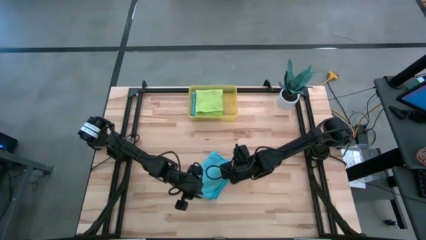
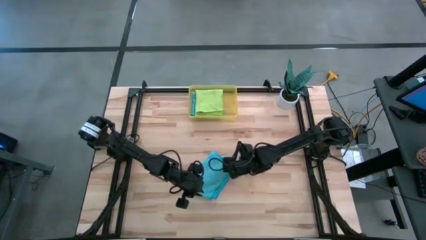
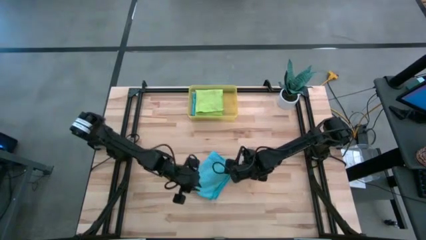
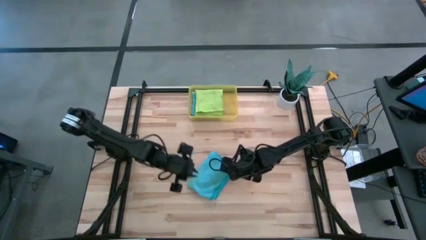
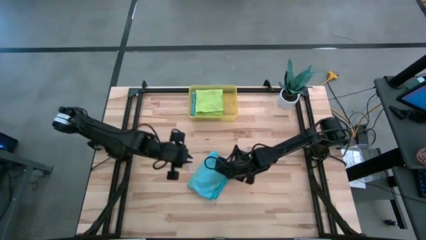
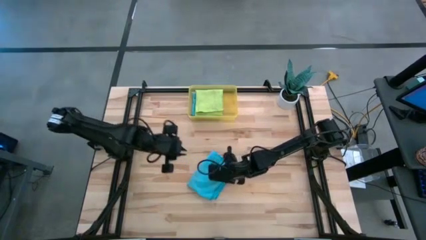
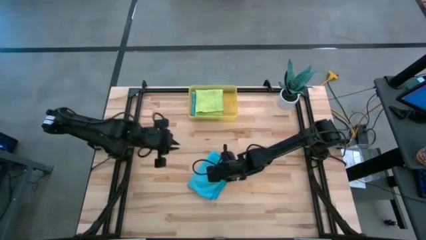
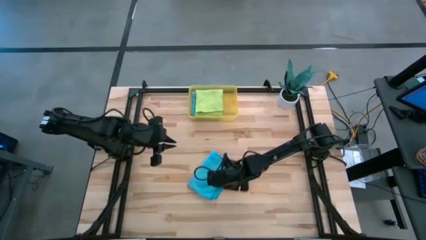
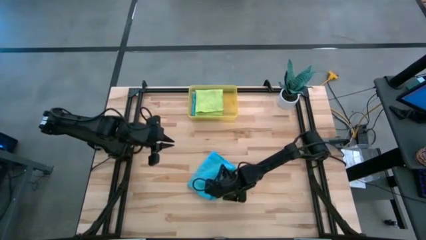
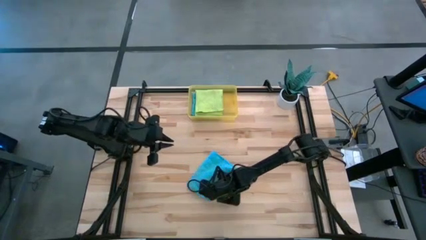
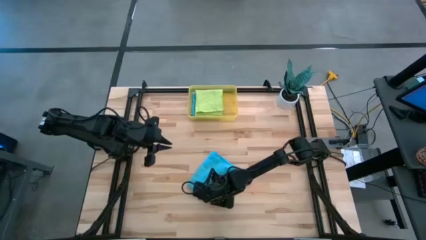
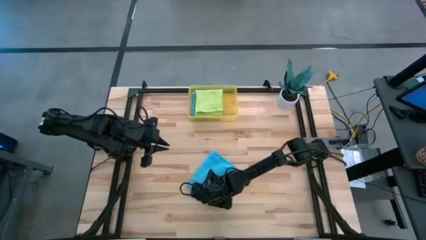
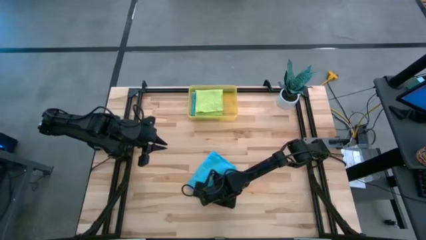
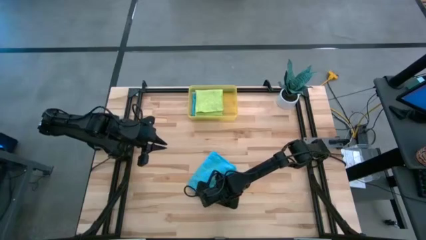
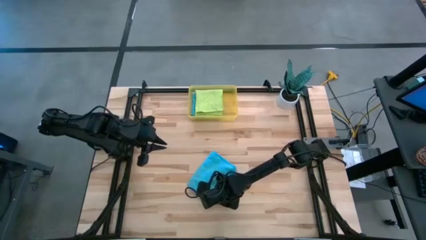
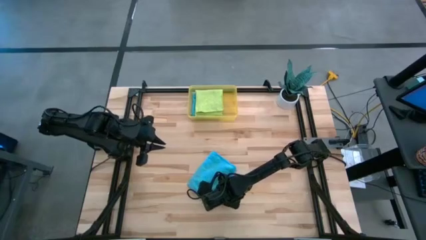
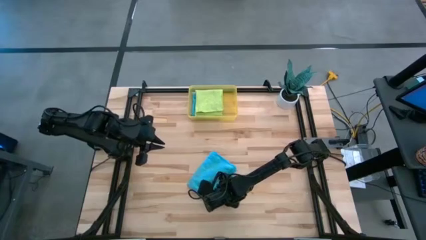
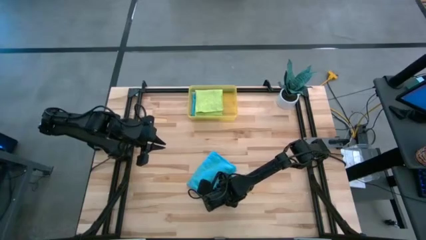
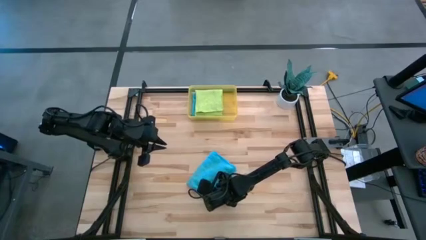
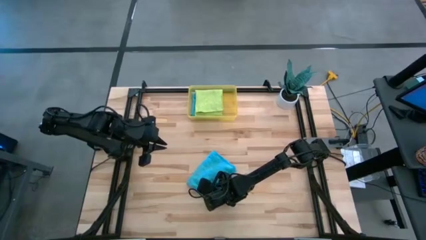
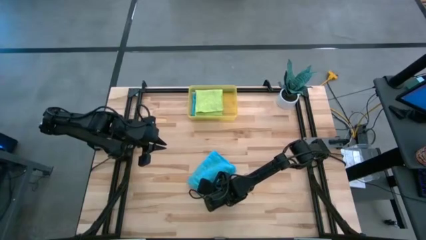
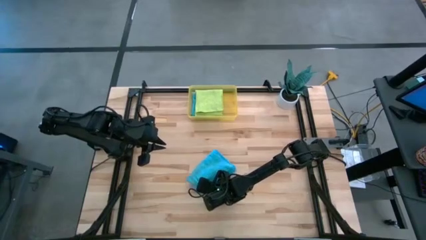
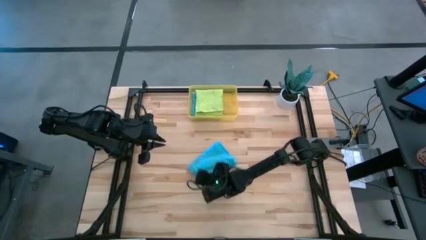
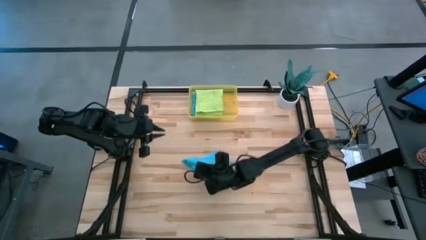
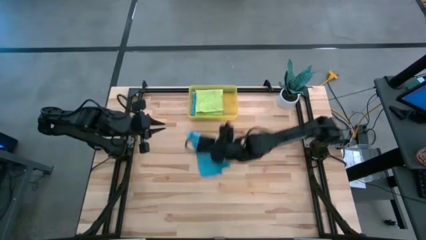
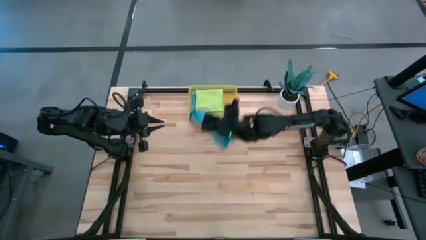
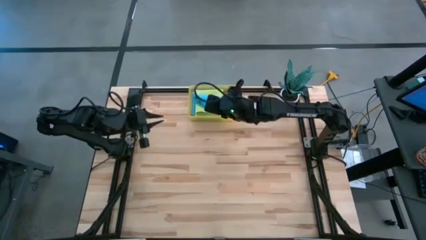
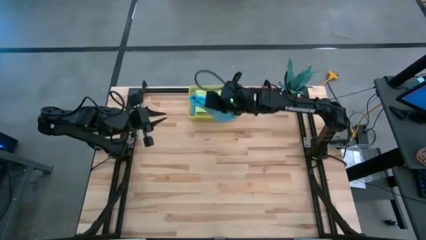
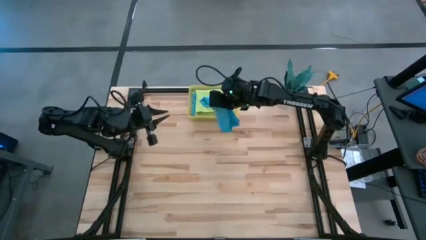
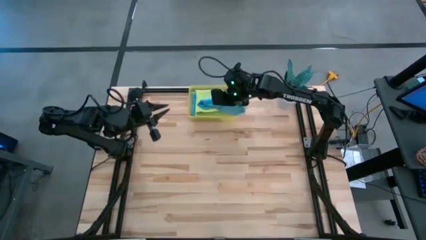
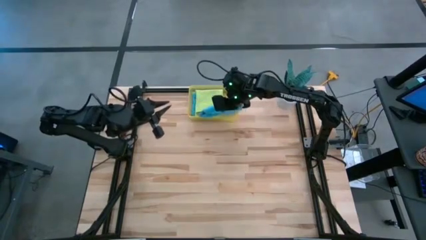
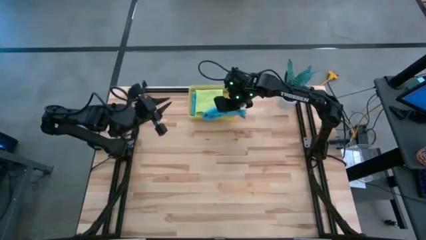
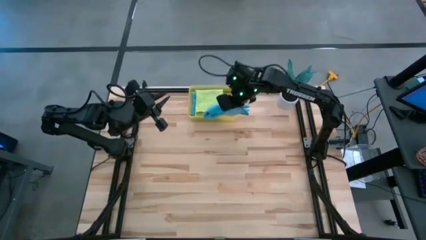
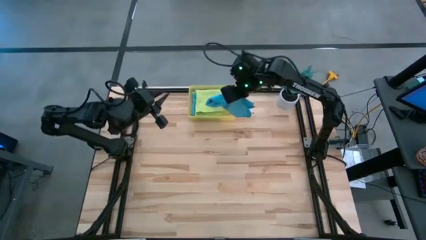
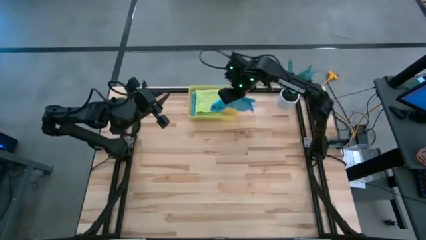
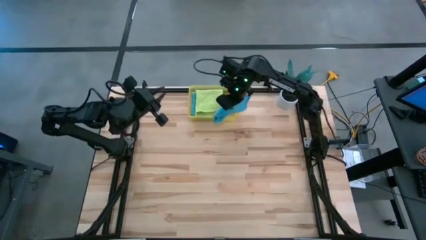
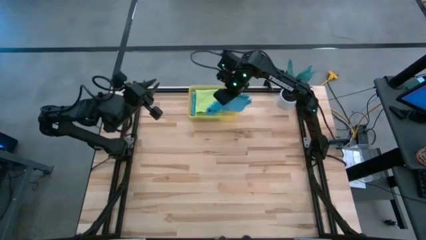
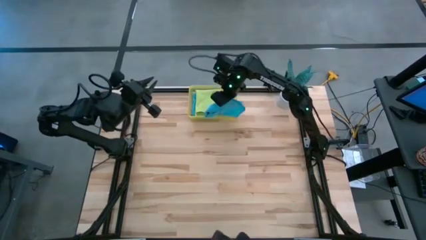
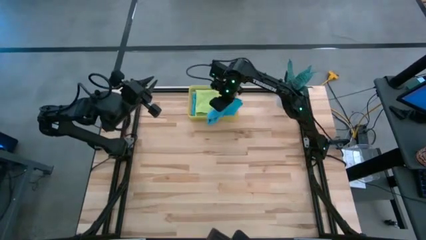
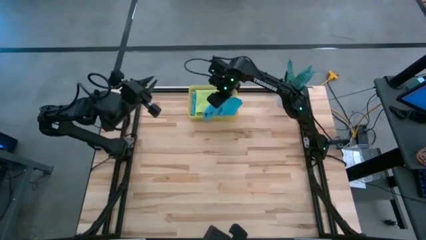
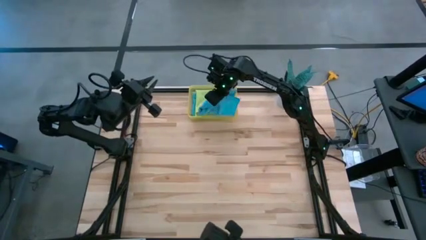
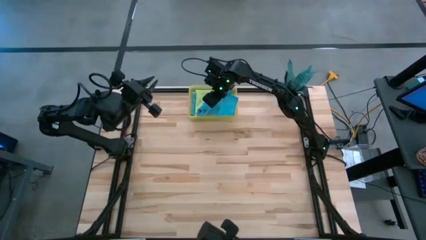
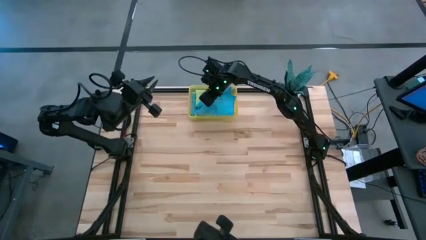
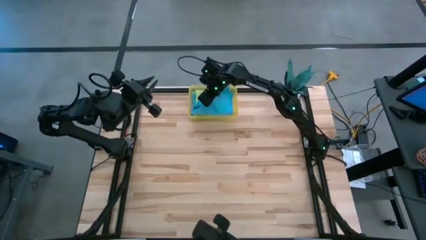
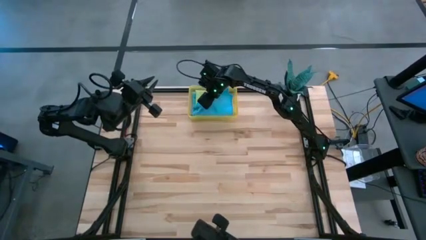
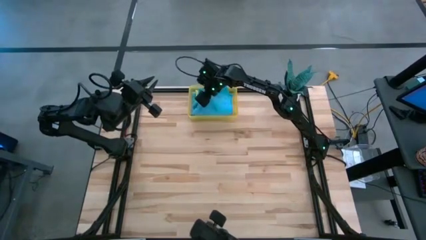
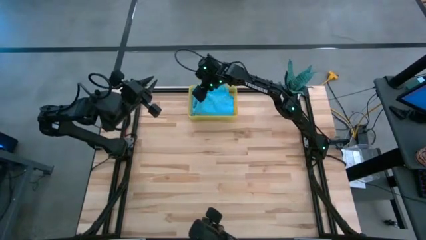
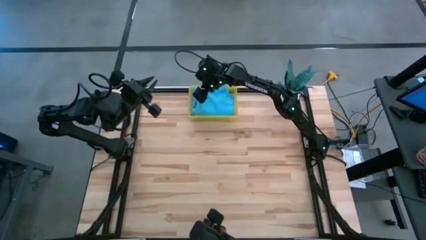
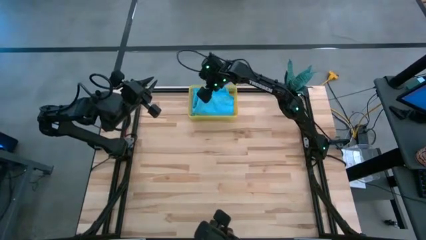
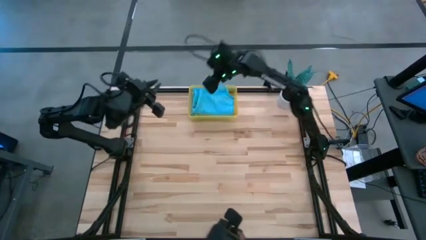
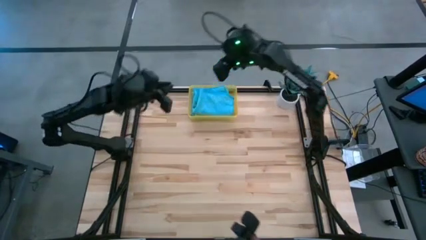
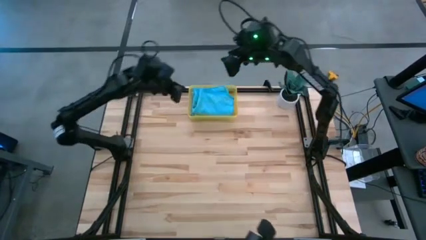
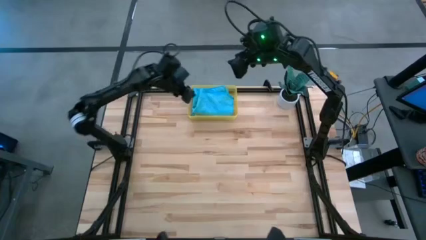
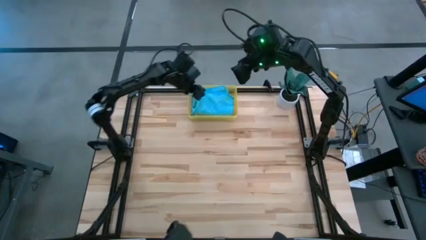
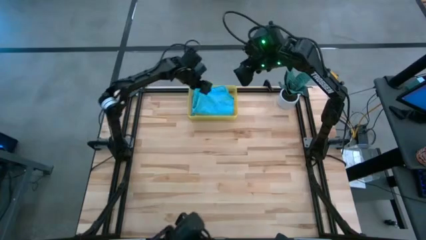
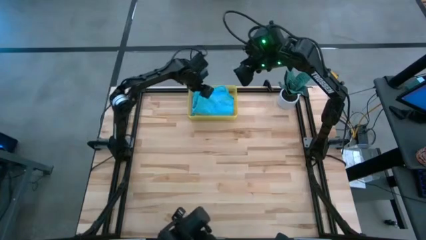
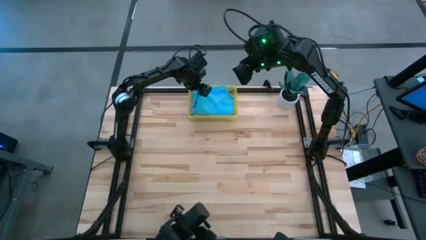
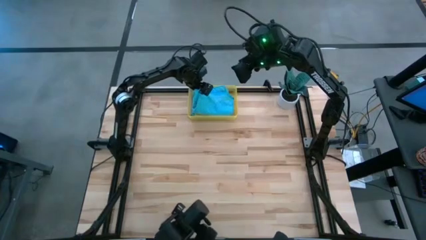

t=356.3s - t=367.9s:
Task: Fold microfiber towels
Stack the blue microfiber cloth on the green microfiber cloth in the yellow bin

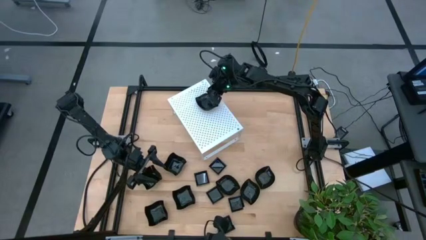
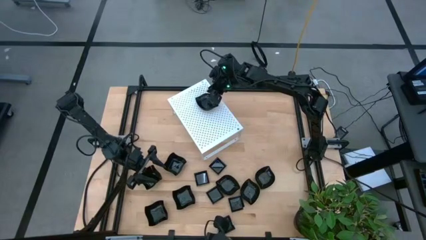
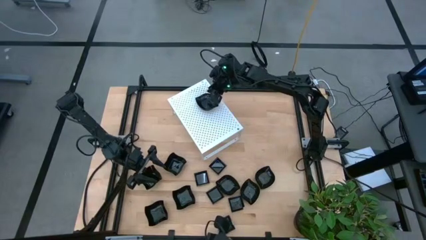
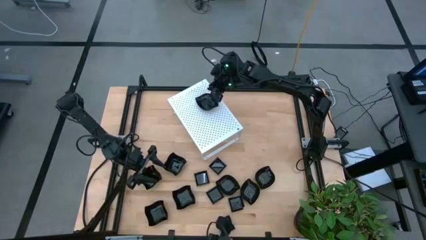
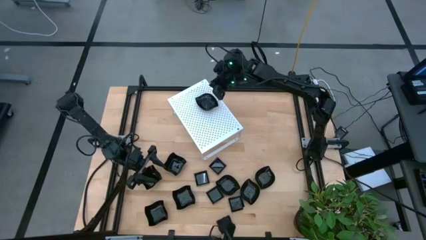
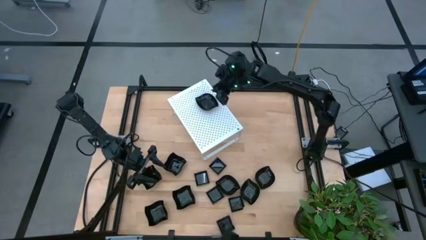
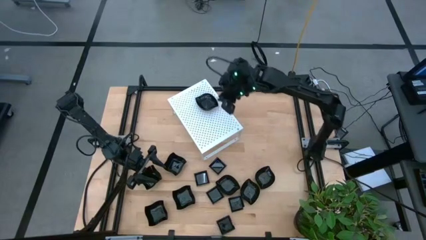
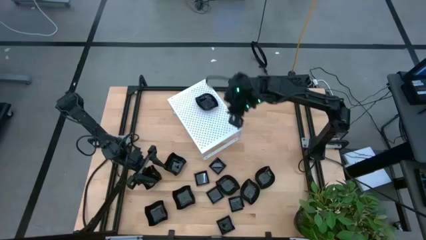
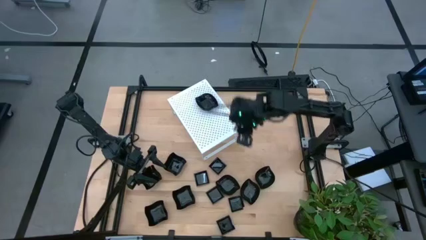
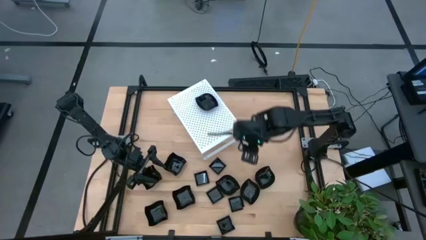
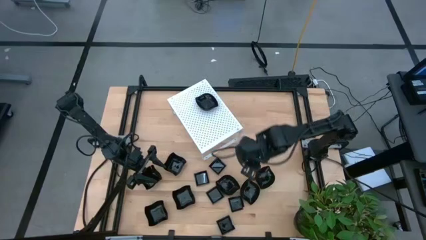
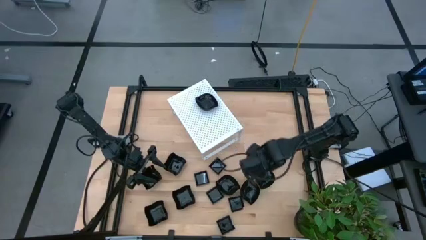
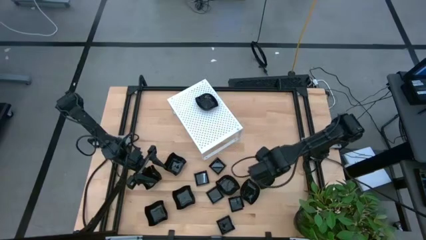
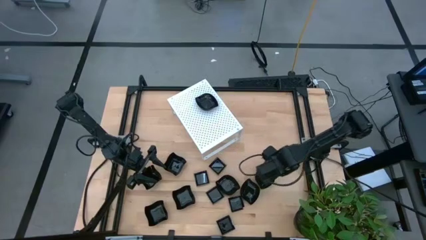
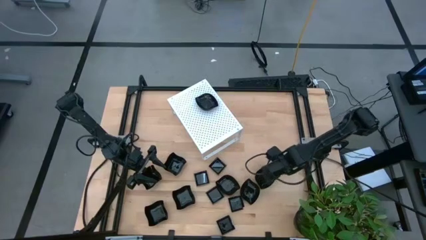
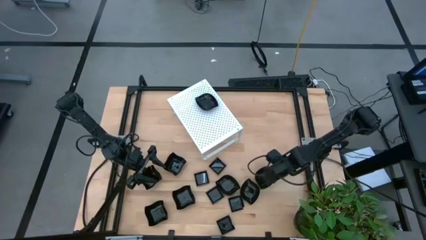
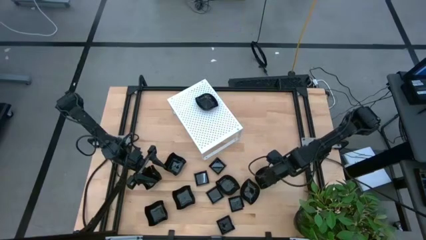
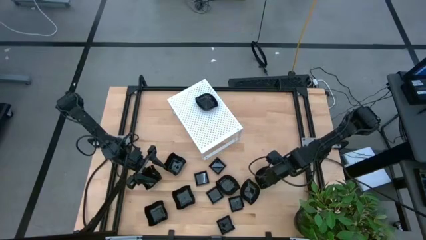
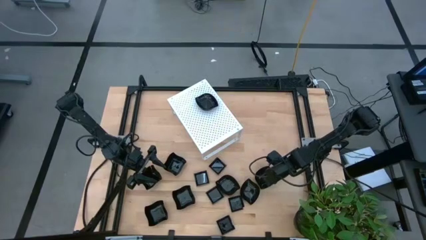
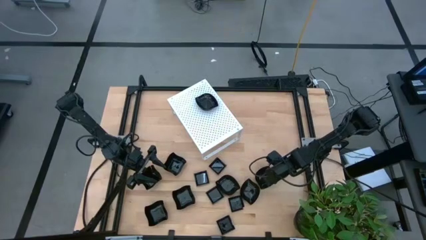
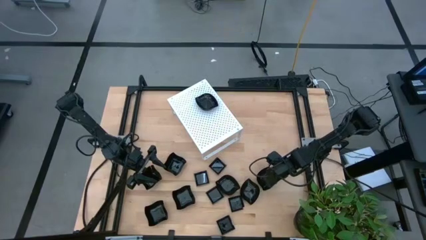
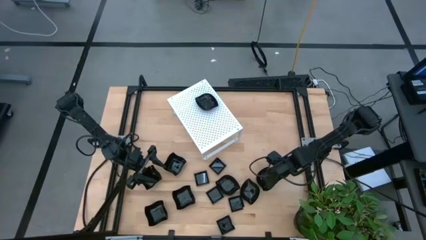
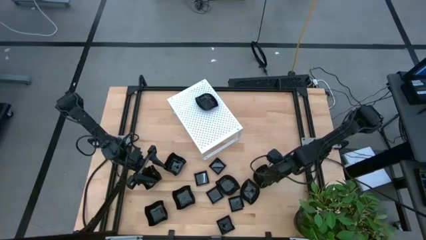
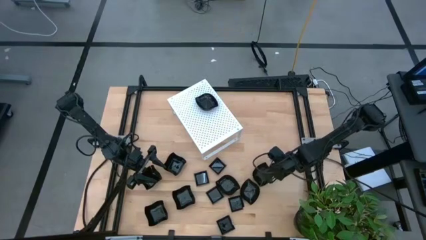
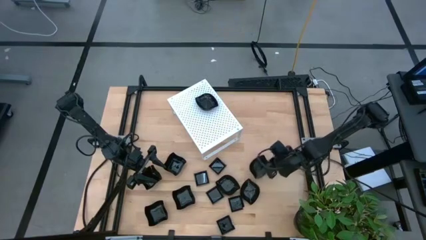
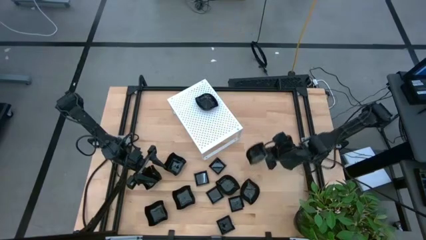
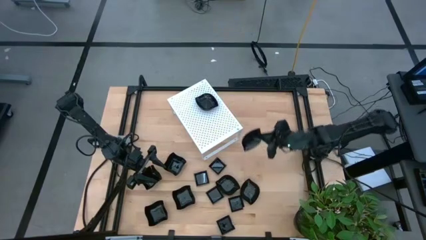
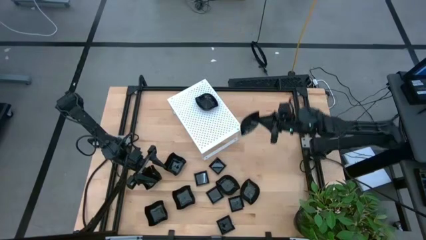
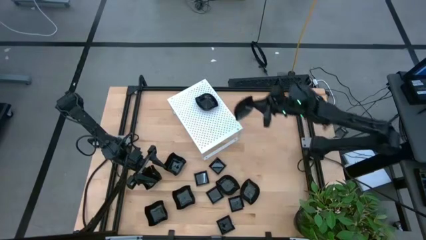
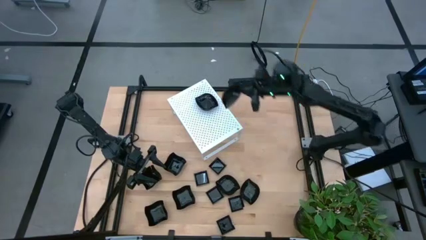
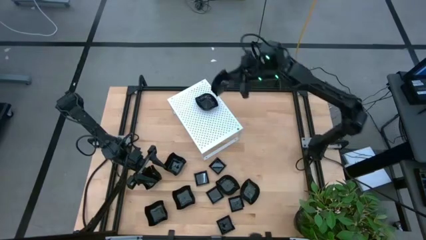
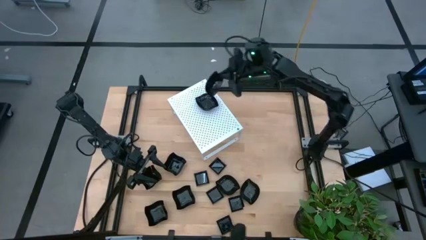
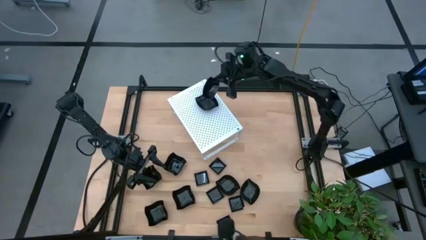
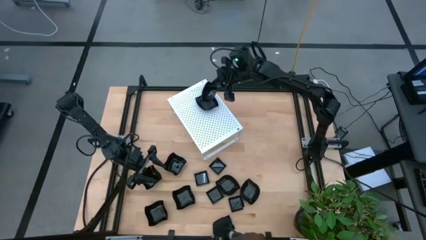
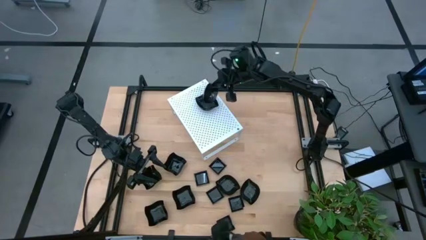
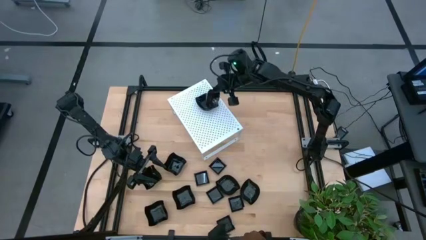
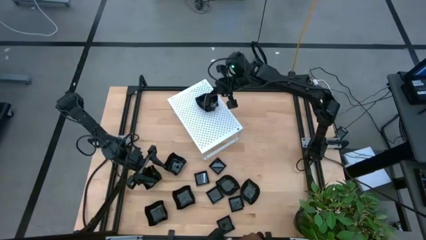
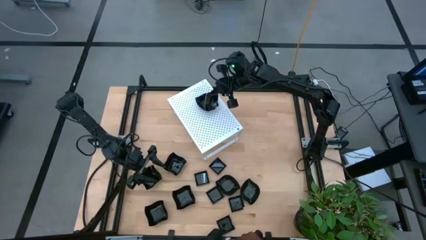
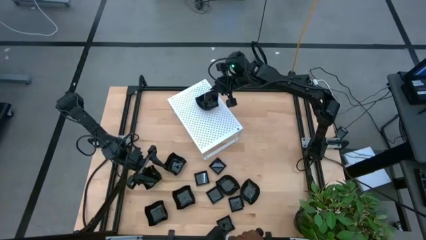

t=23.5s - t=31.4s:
Task: Pick & Place Mini shaped plates
Stack the leaf-shaped plate on top of the stacked leaf-shaped plates on the shelf
